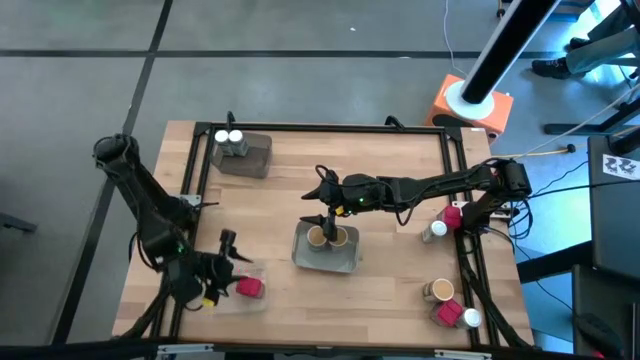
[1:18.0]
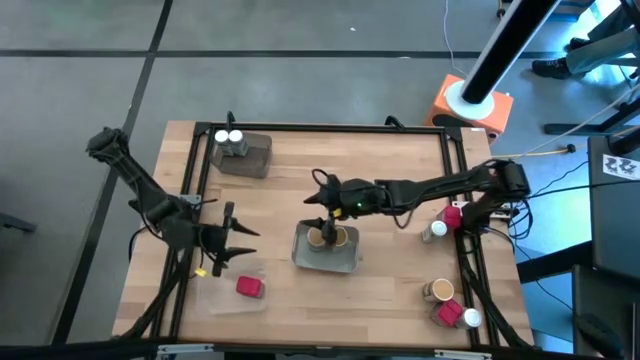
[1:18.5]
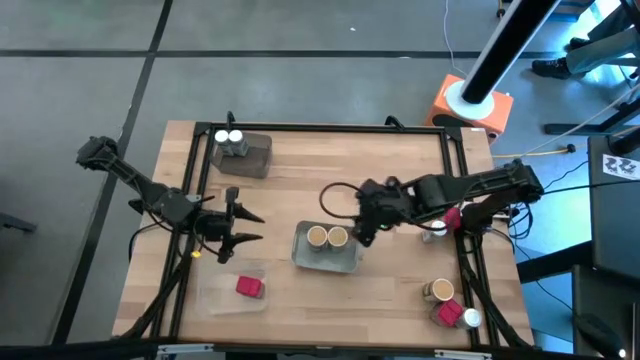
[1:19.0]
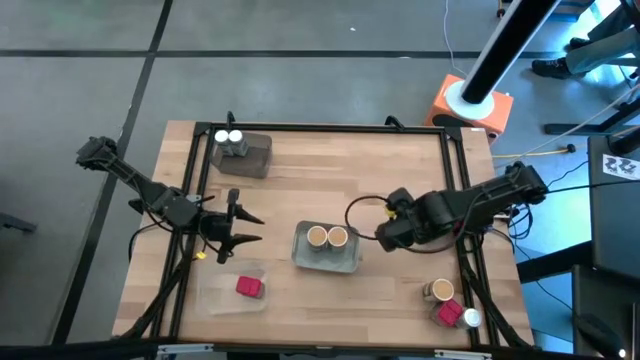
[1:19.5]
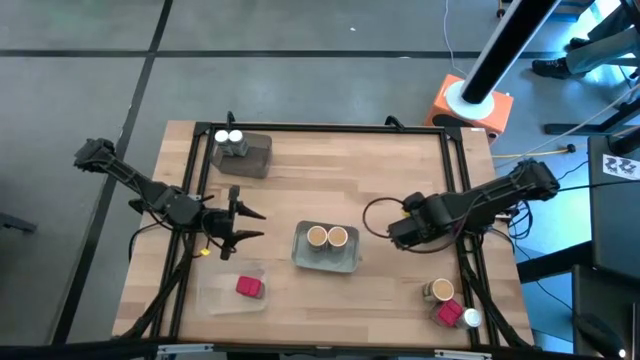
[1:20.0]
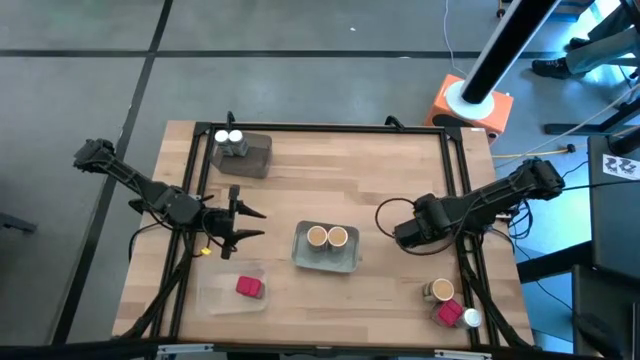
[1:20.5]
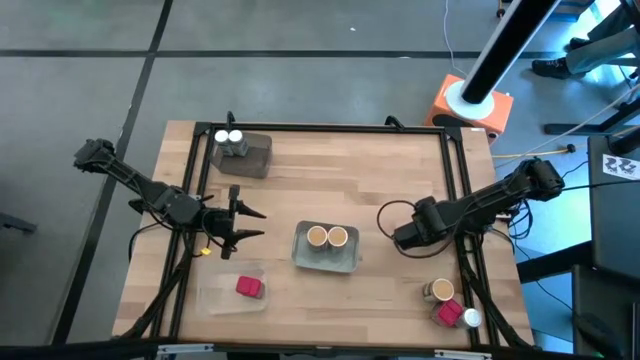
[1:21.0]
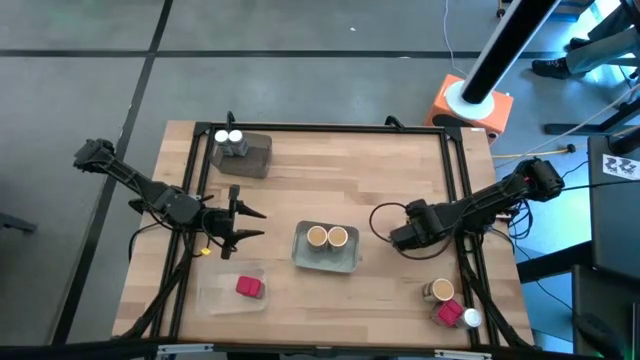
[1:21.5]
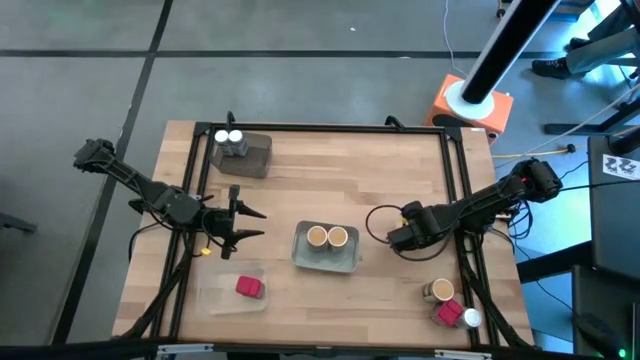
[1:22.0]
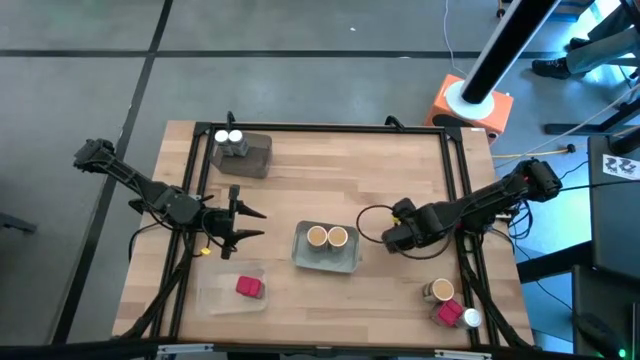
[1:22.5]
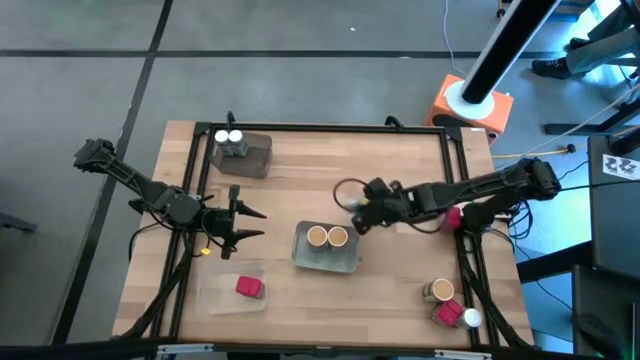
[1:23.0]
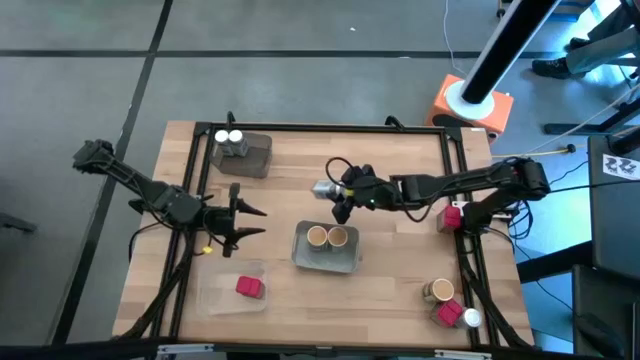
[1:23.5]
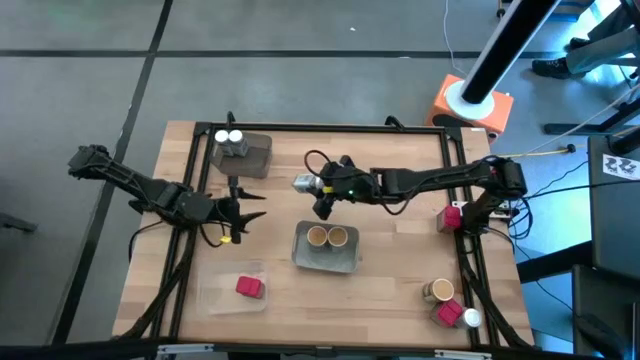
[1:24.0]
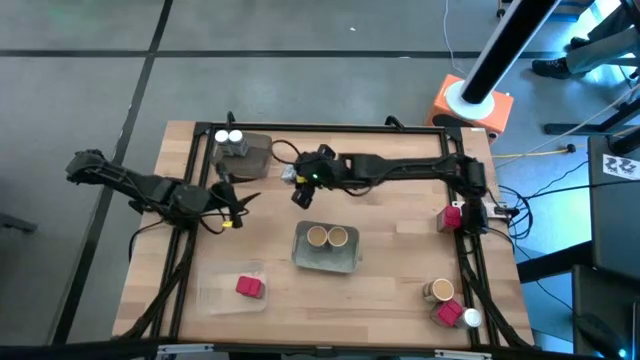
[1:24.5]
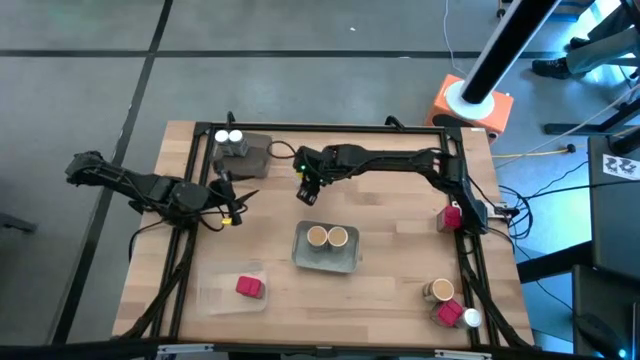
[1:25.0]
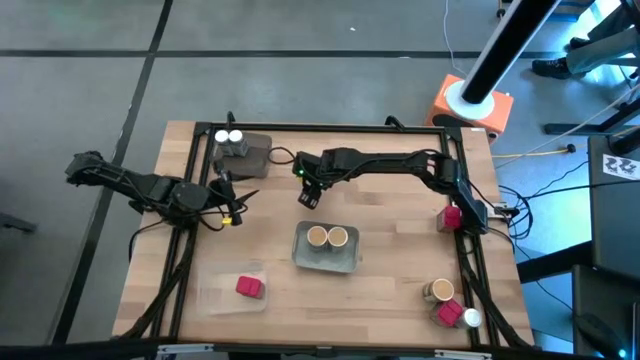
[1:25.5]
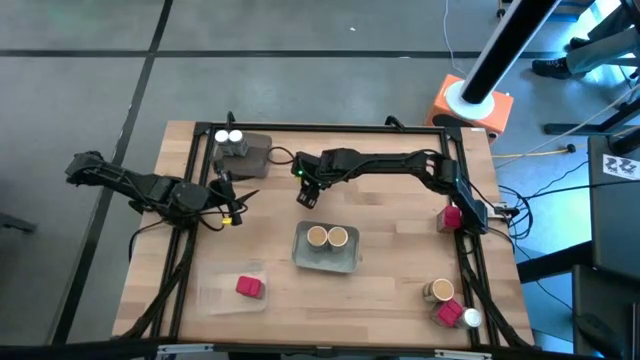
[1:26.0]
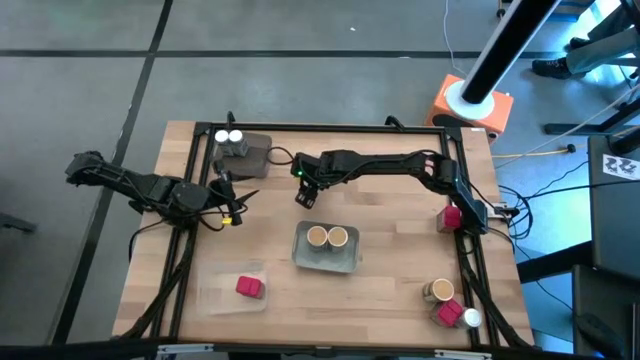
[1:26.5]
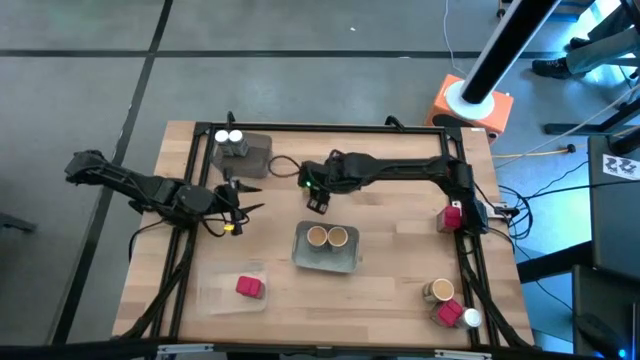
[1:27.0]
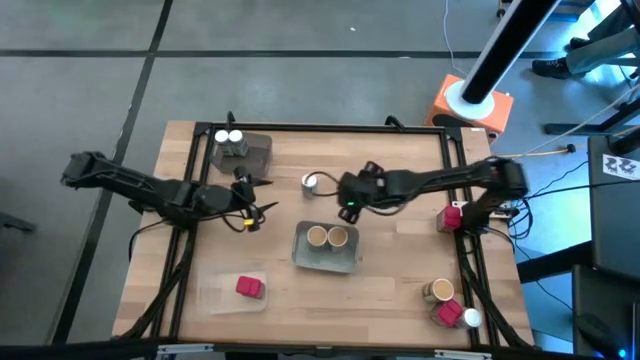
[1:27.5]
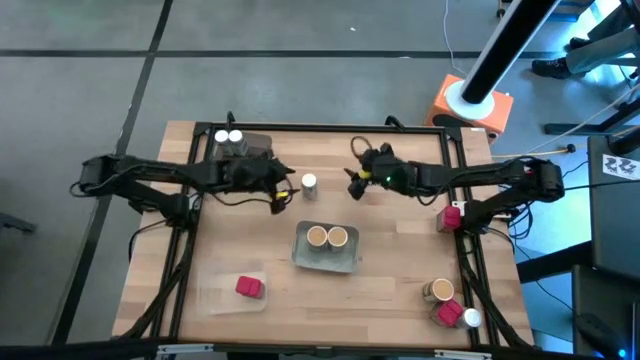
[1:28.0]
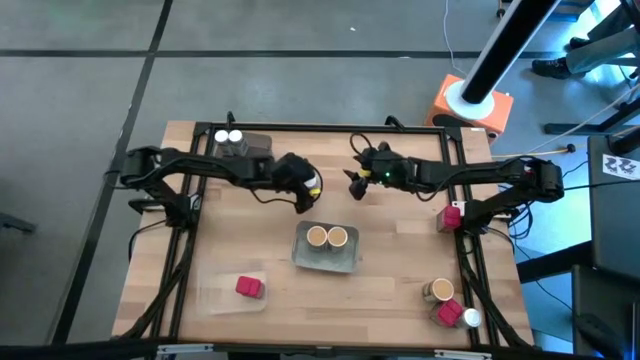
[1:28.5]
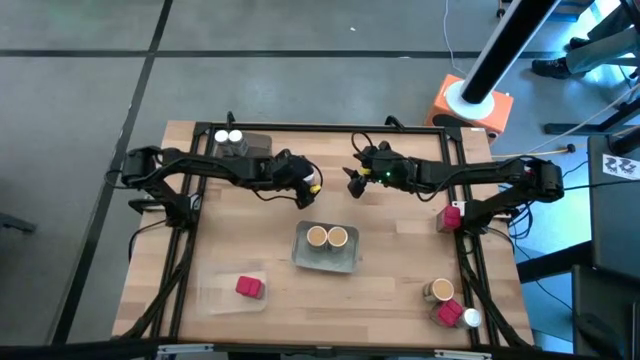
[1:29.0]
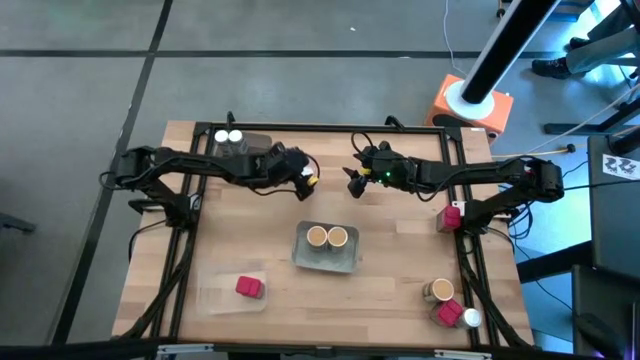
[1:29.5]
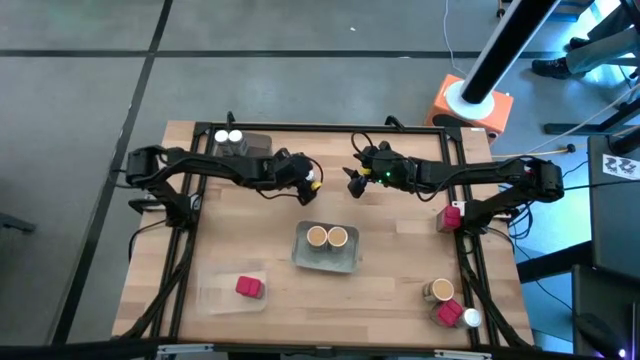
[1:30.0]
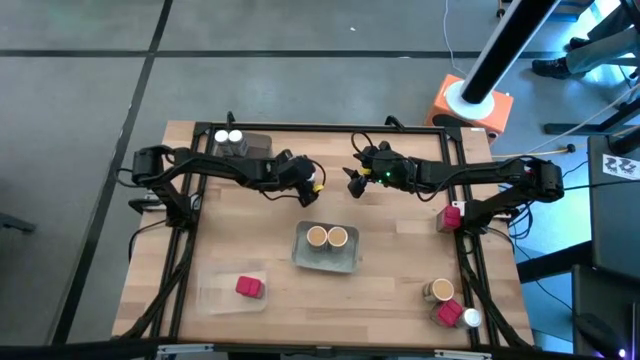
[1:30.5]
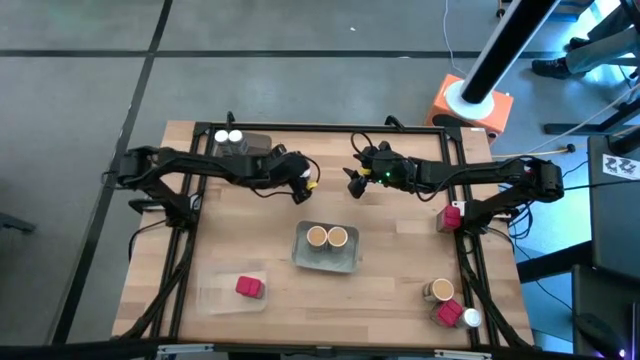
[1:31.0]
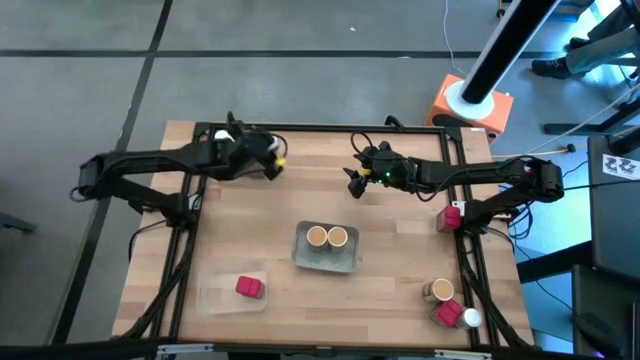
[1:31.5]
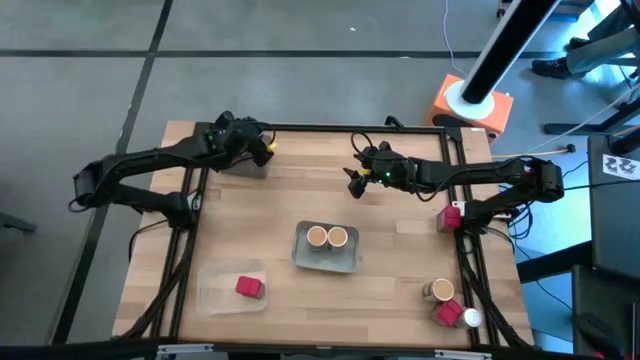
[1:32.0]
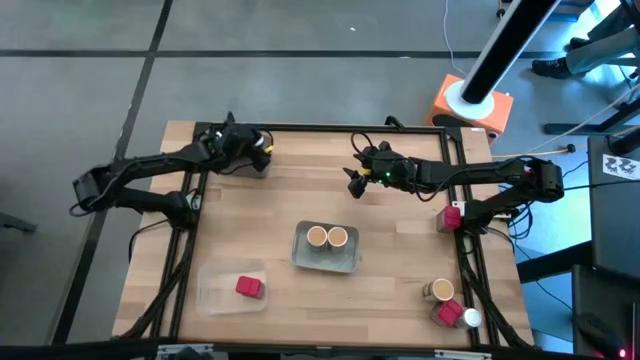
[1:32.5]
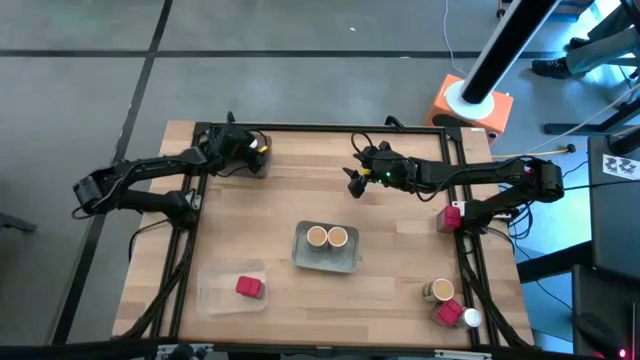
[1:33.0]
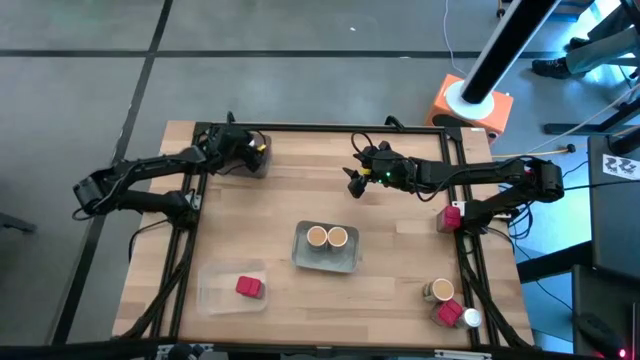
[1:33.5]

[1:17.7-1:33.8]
Task: Sort spices by type
Put the top white seasoning bottle into the black bin

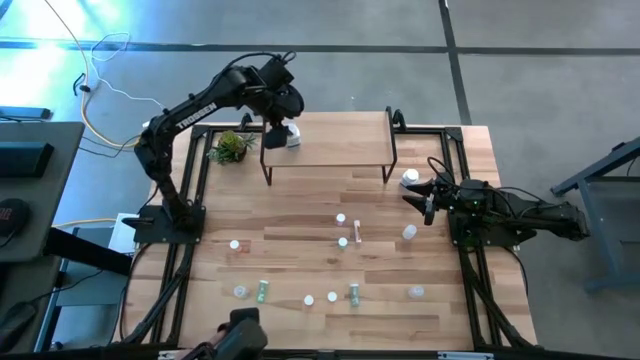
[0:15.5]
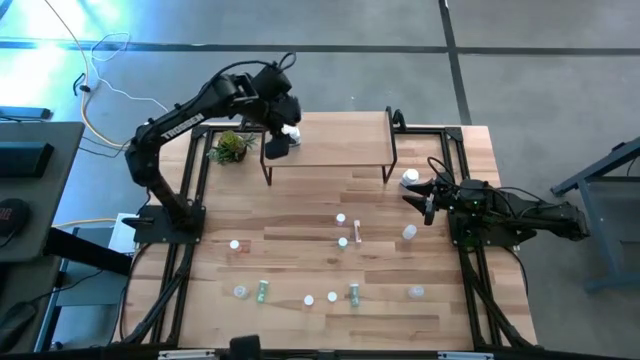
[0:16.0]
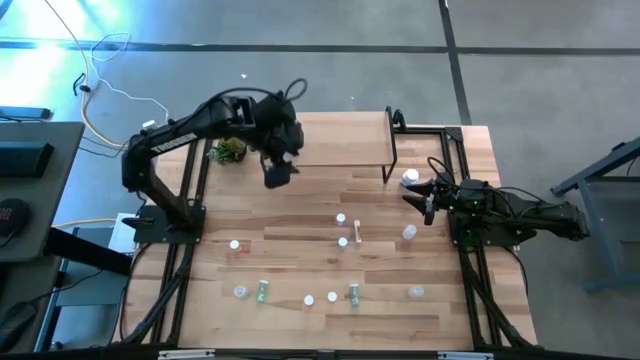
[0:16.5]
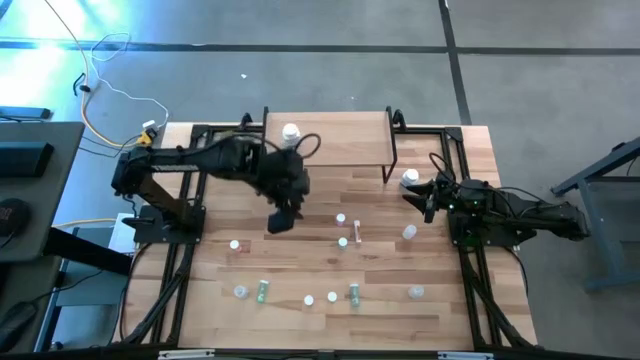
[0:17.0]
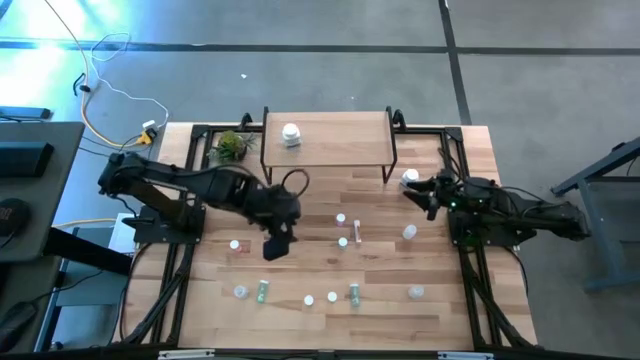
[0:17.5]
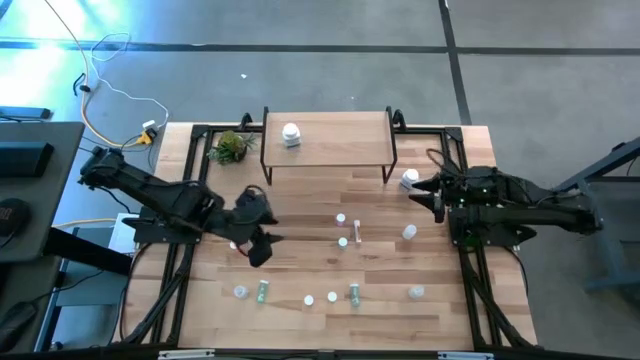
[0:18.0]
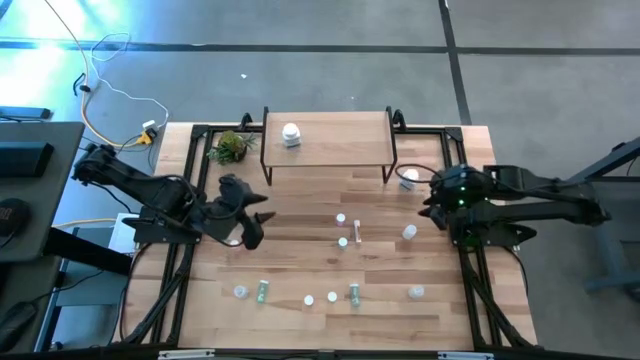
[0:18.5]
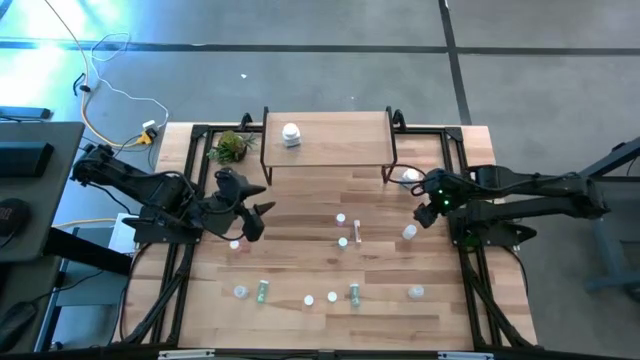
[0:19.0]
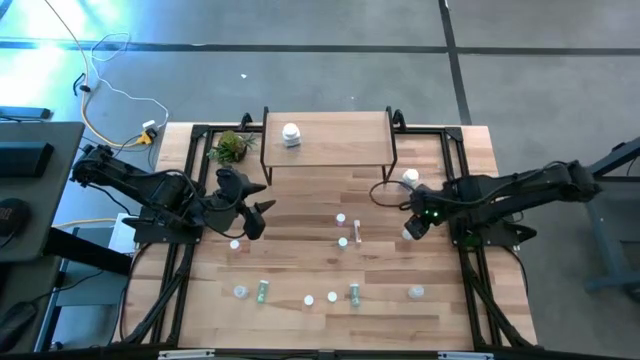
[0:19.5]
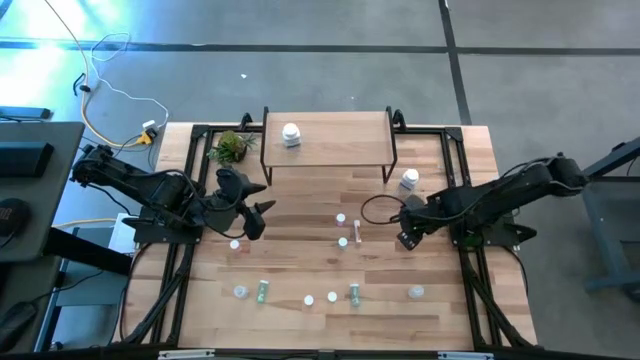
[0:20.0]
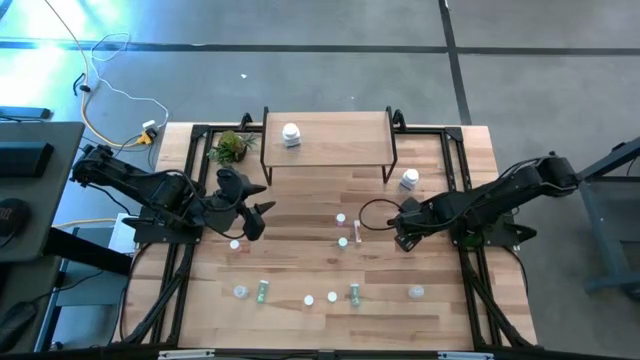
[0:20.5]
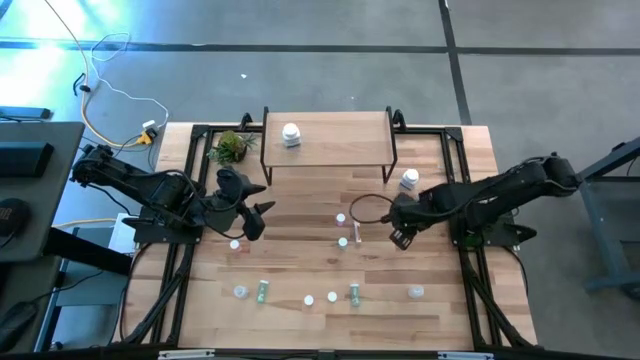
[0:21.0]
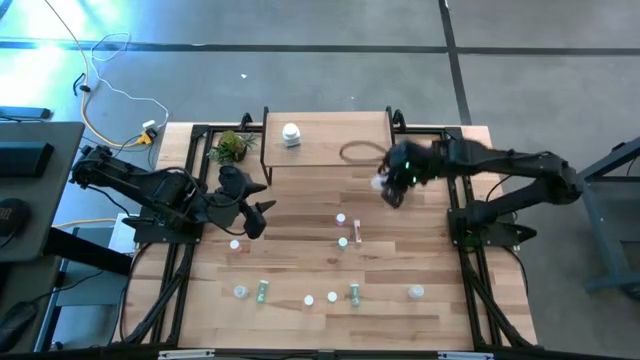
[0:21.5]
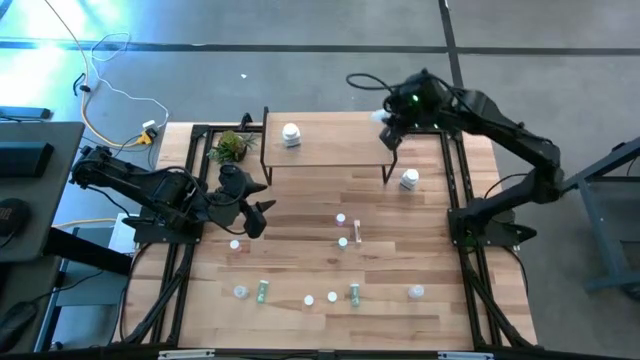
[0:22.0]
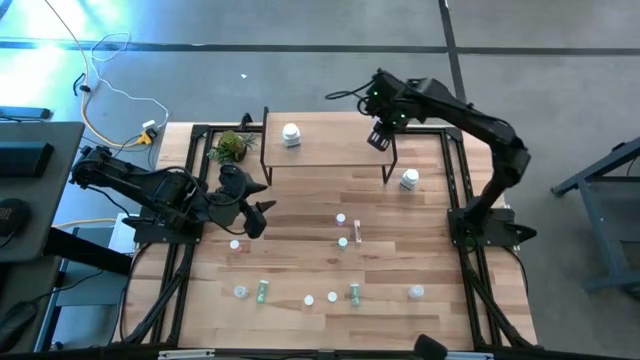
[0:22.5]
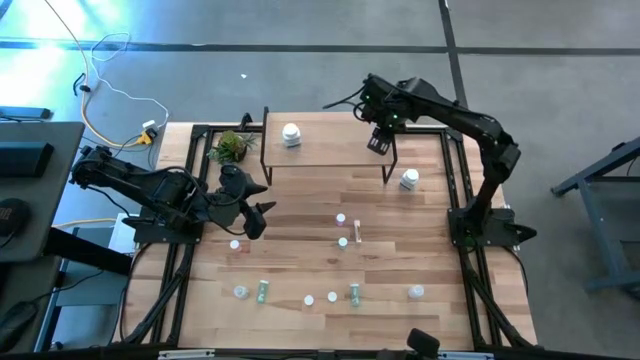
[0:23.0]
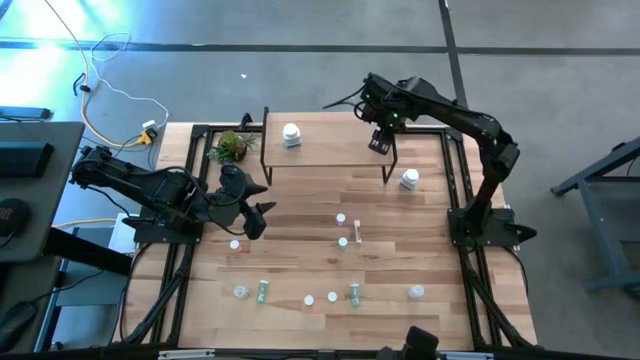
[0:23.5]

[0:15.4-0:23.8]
Task: Pick and place medicine bottles onto shelf by color
Put the top transparent pill bottle on the shelf
